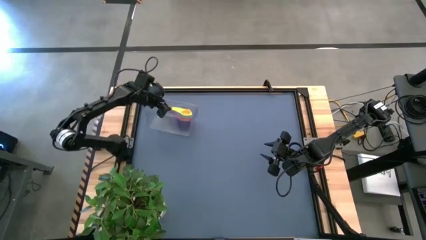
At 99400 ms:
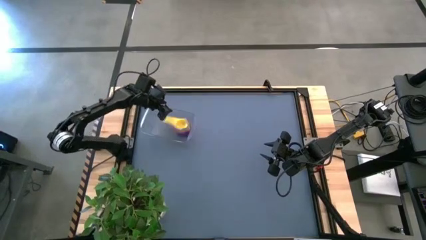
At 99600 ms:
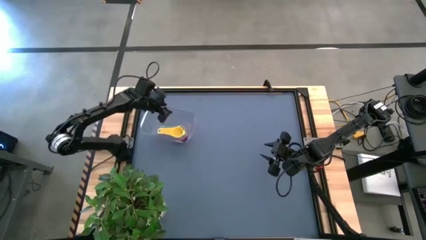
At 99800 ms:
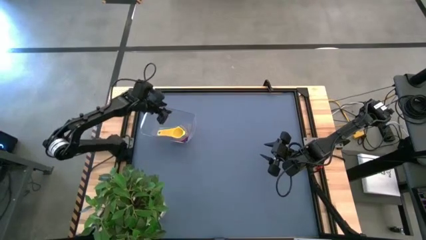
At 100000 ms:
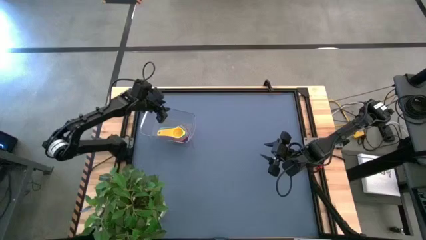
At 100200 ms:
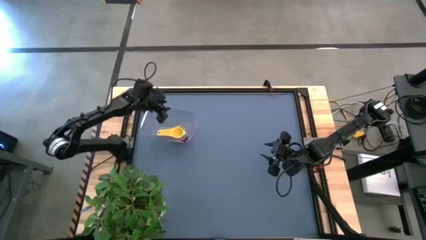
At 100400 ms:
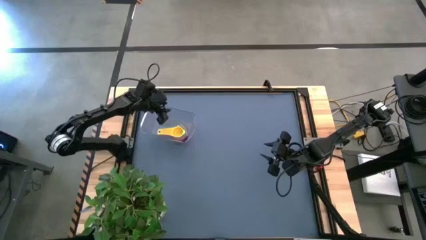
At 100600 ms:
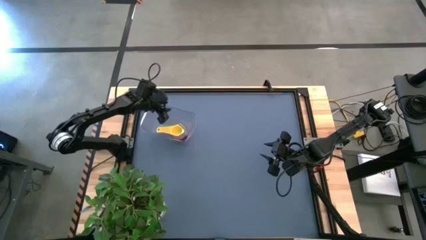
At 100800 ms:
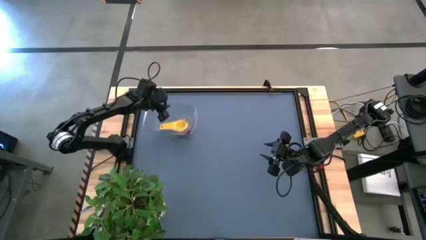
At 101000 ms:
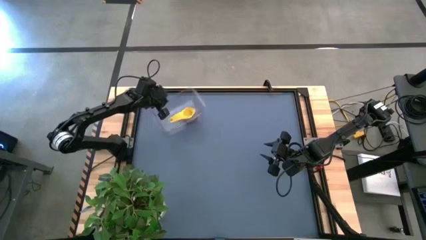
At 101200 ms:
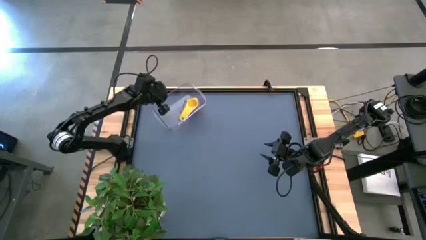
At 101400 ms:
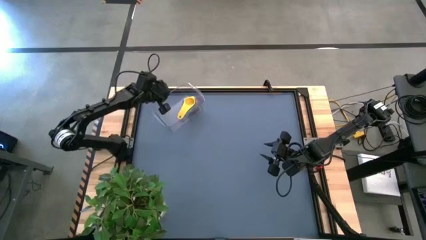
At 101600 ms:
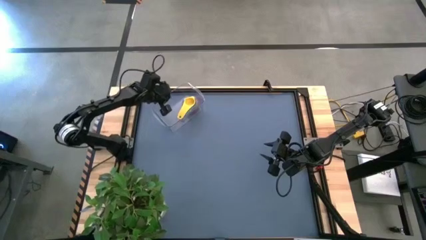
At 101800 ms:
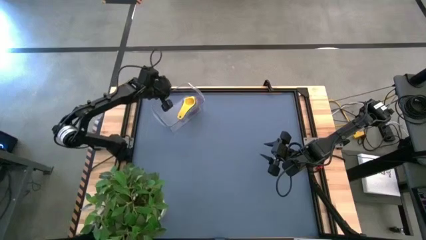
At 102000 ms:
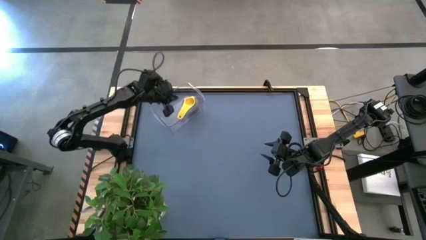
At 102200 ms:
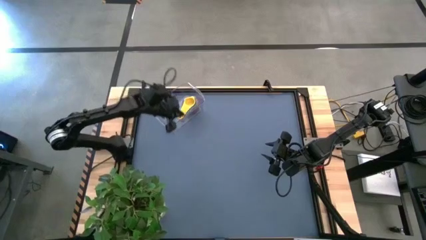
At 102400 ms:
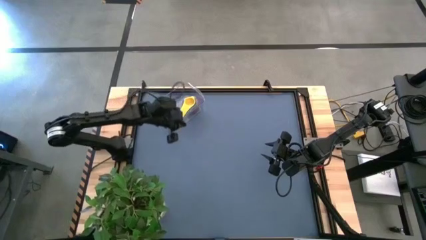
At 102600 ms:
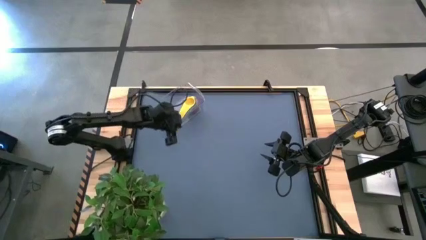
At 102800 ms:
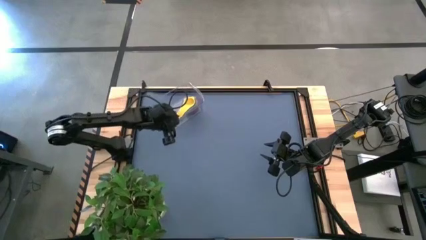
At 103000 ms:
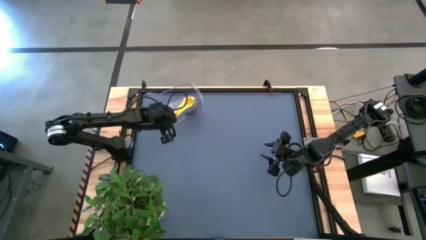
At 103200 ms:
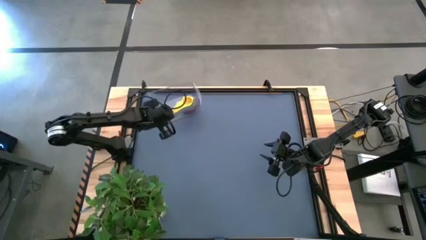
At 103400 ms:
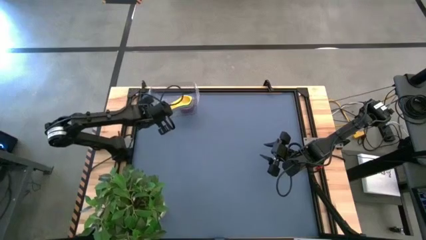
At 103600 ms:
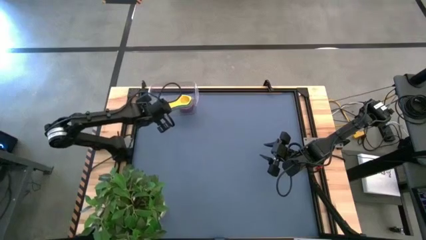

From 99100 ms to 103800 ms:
Task: Nest measuring cups in basket
Adjust the transparent bin

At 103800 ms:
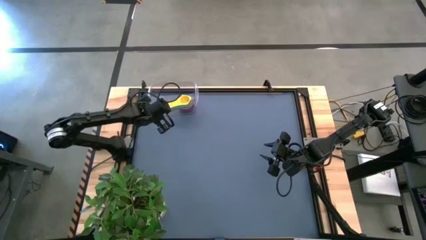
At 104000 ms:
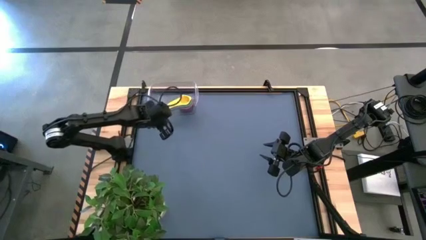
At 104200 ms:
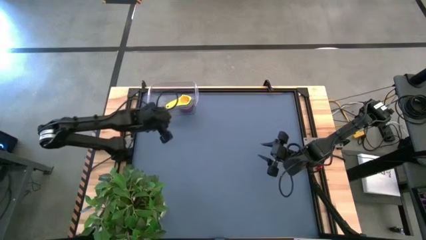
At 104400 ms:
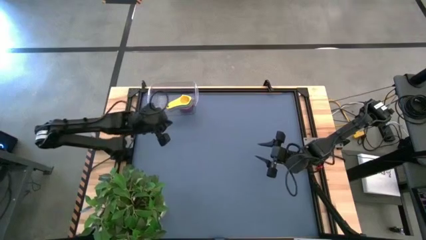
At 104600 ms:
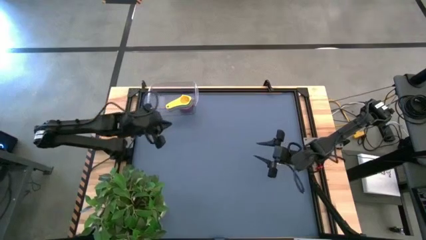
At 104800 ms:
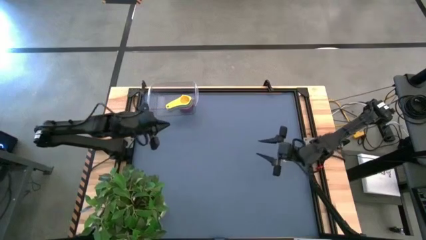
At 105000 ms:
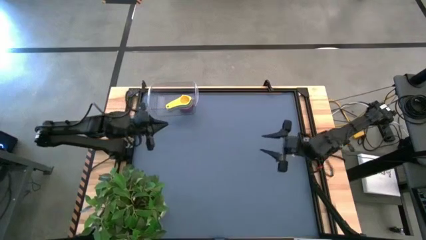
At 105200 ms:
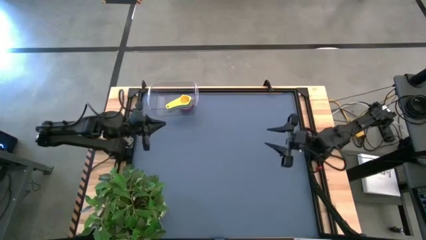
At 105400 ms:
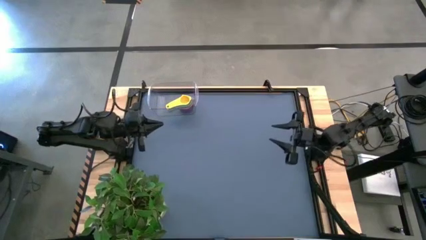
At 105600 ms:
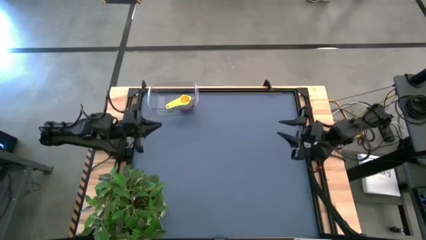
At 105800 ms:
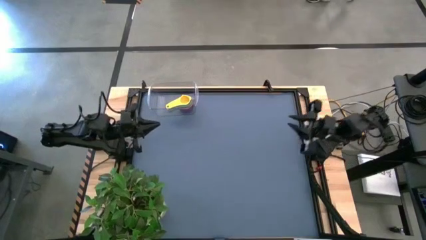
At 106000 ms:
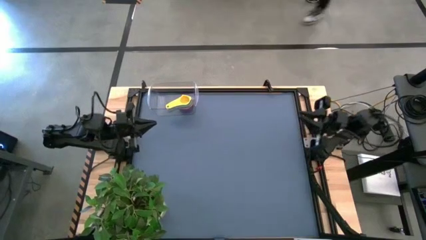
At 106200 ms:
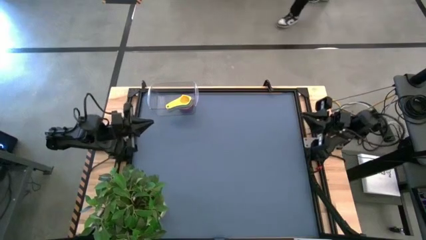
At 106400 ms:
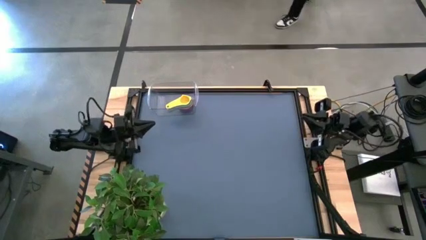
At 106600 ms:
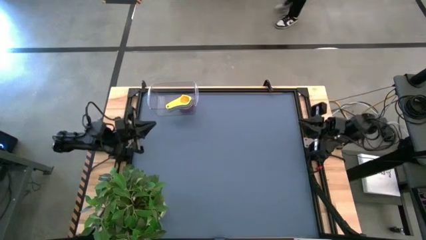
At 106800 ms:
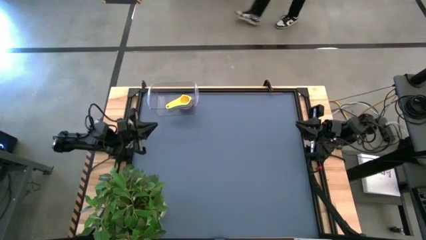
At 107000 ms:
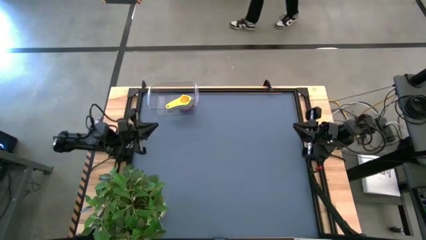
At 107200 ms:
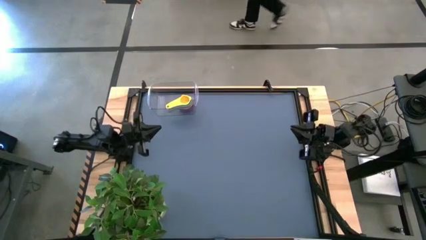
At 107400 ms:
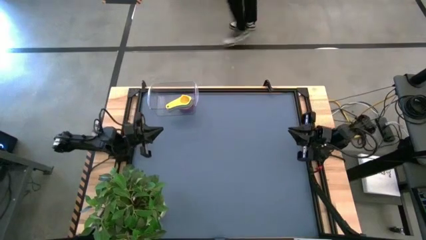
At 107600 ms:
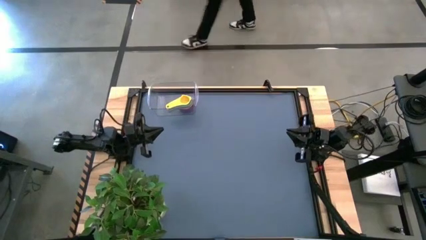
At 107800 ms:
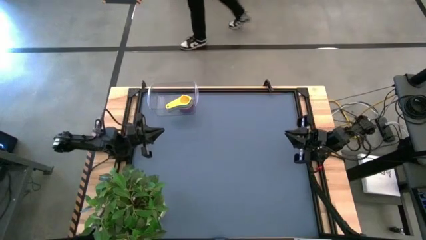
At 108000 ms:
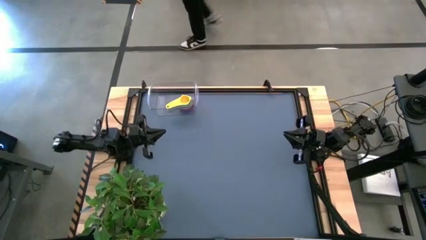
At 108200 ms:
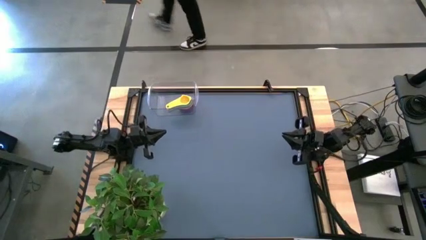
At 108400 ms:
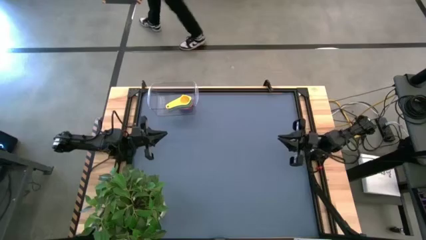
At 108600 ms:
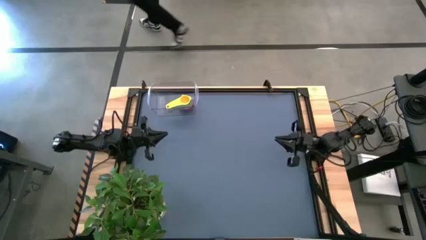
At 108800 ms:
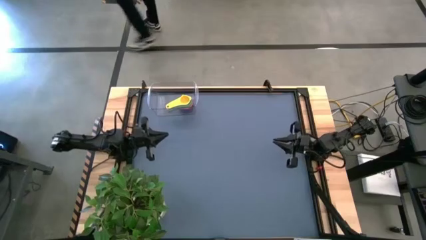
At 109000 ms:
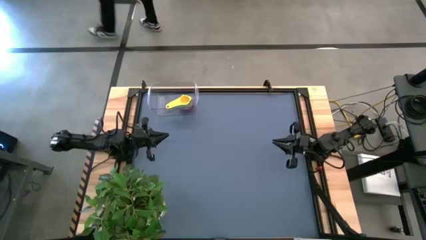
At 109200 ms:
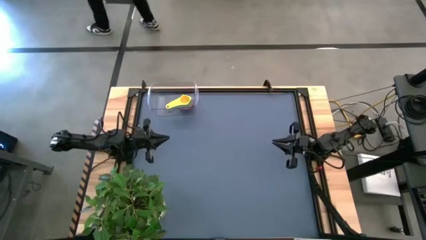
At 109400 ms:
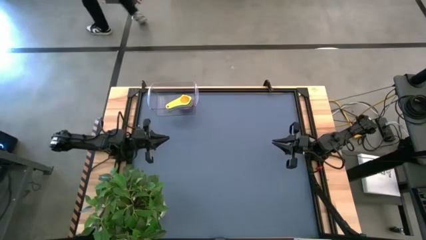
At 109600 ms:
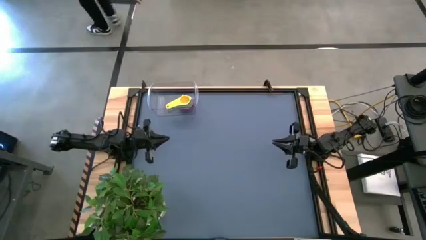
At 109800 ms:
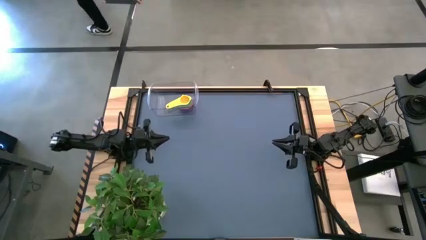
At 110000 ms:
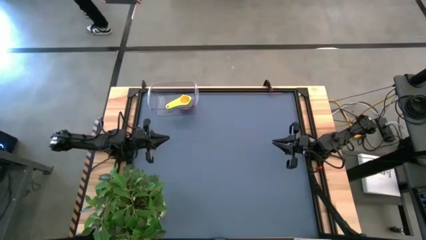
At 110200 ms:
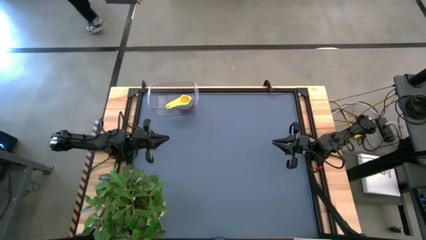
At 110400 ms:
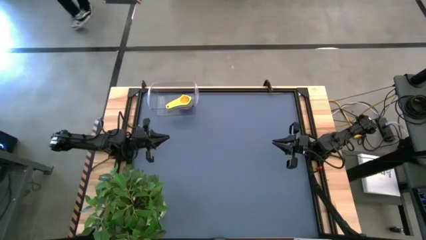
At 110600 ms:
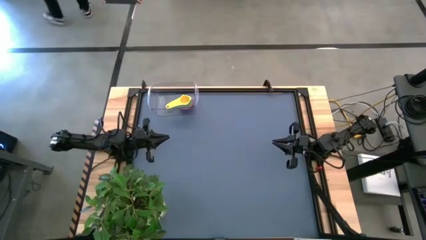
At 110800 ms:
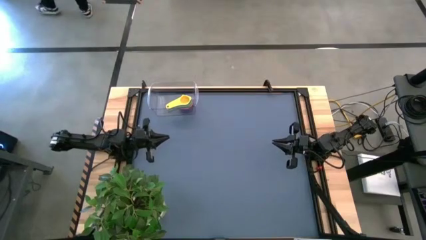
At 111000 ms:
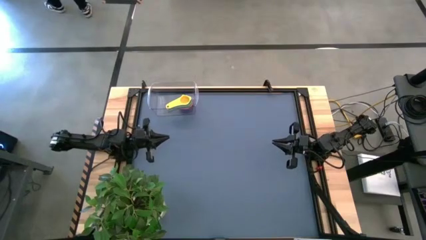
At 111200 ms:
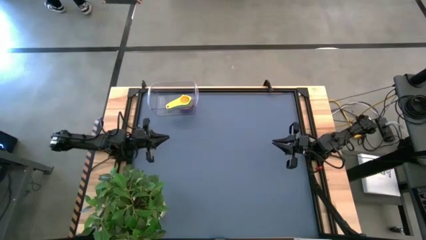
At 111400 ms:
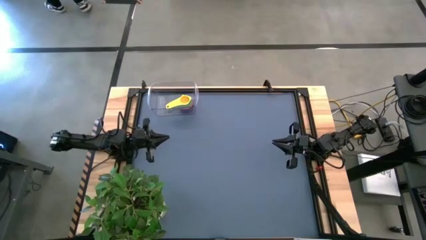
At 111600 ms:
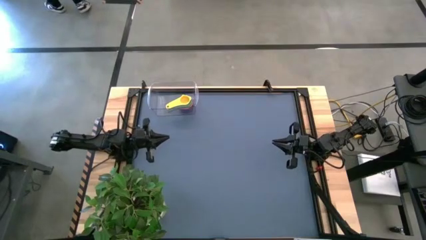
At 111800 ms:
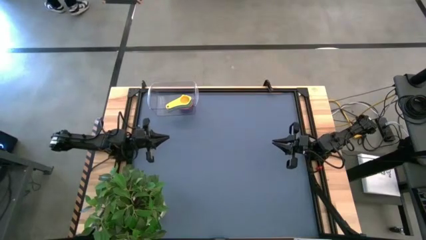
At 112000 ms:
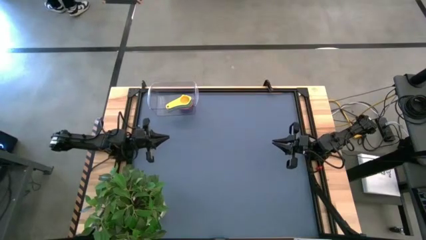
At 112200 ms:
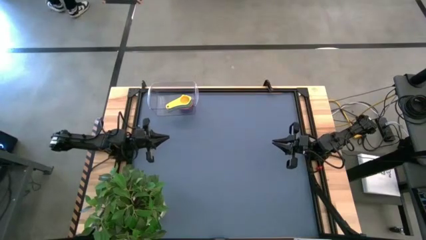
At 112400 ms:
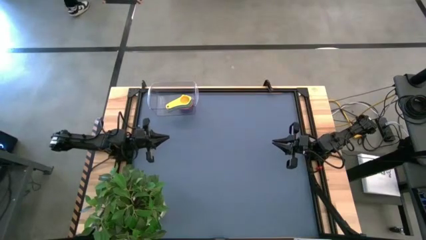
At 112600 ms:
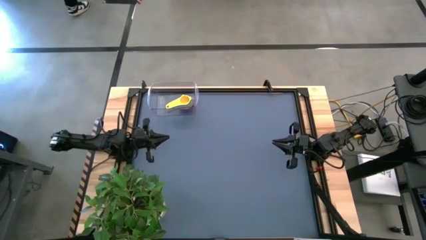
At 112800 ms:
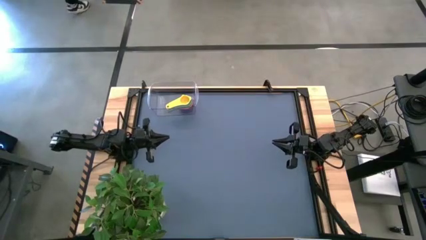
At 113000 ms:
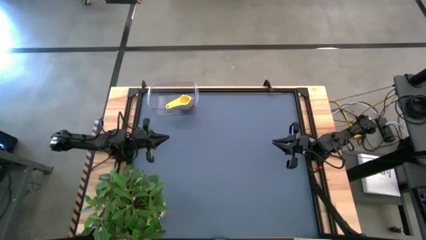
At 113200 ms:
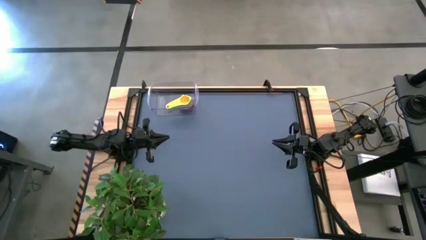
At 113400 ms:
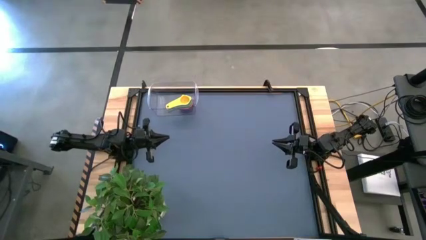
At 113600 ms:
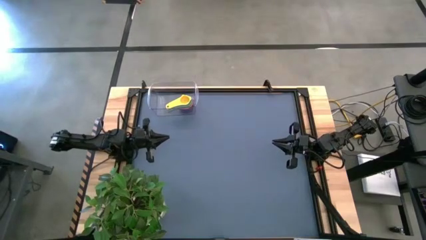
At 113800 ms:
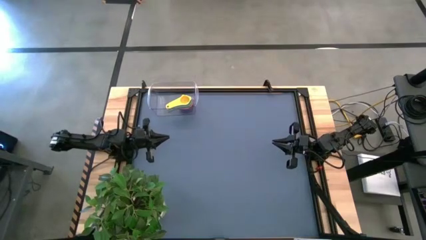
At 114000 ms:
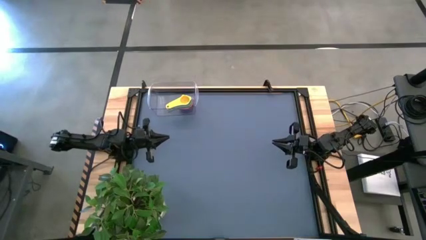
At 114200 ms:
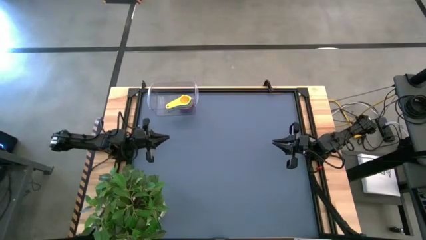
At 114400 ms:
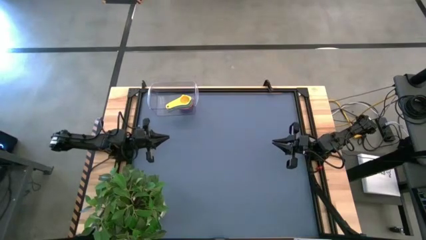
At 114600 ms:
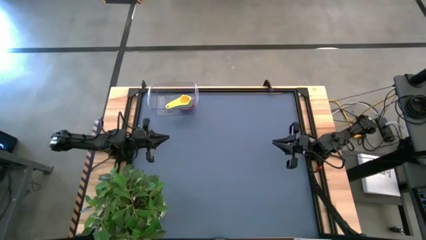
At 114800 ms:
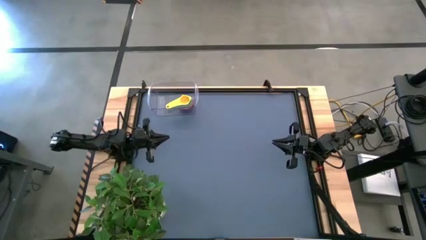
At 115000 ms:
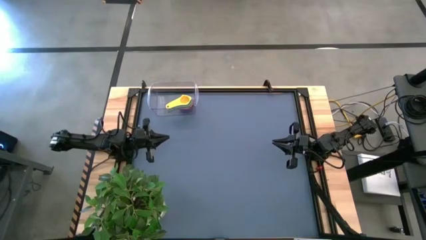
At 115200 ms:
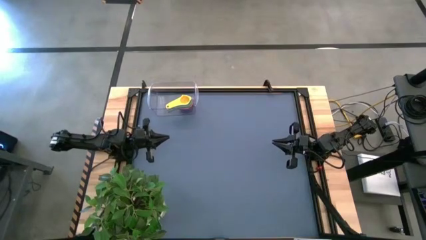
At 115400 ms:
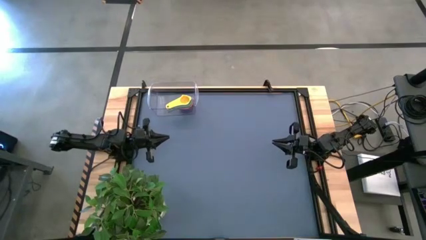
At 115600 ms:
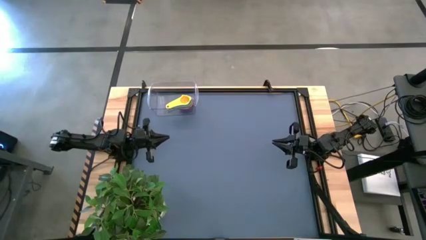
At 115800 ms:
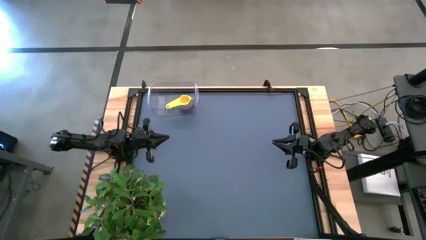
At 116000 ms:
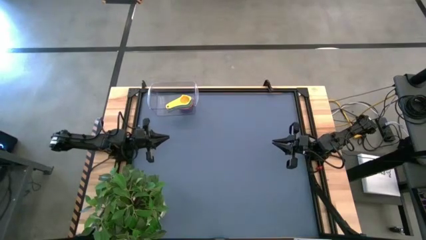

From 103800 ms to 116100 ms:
Return to Home Position
